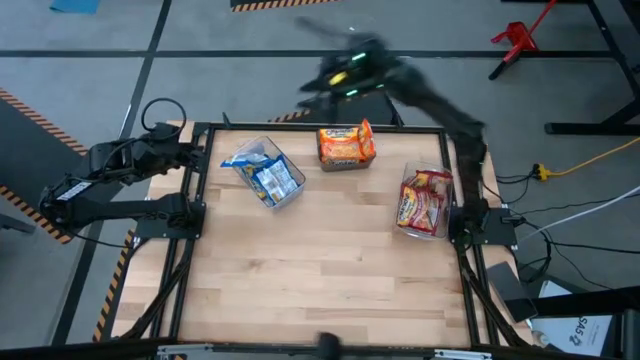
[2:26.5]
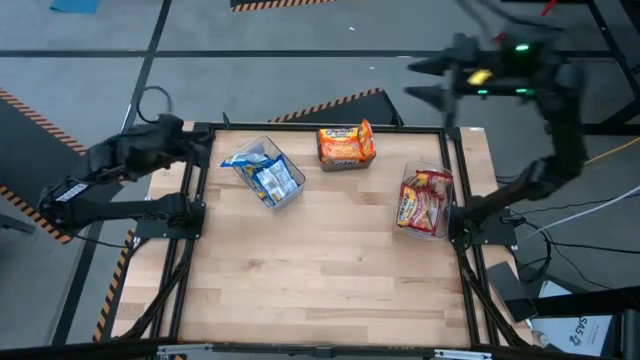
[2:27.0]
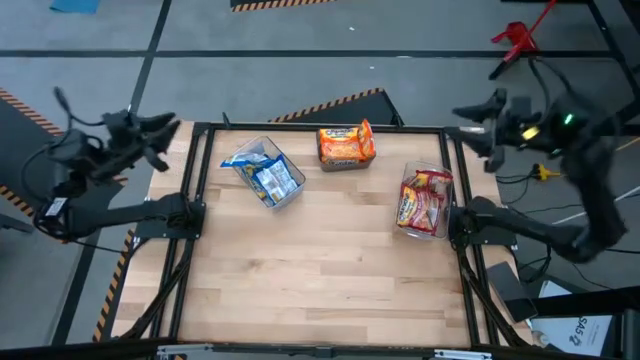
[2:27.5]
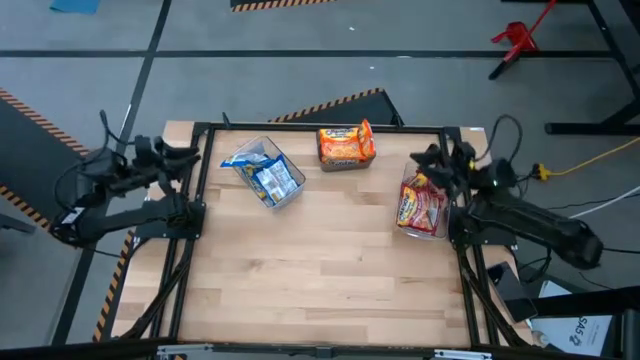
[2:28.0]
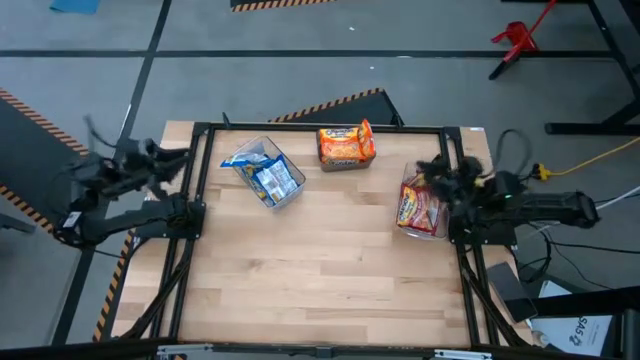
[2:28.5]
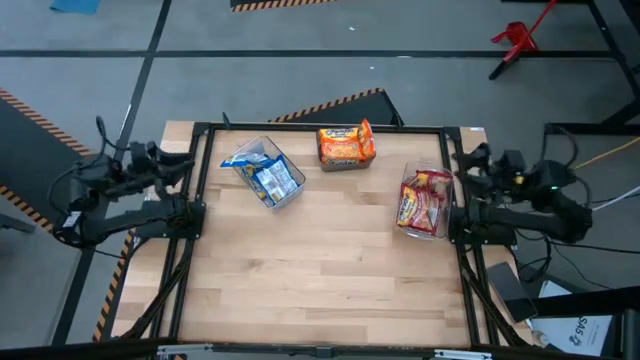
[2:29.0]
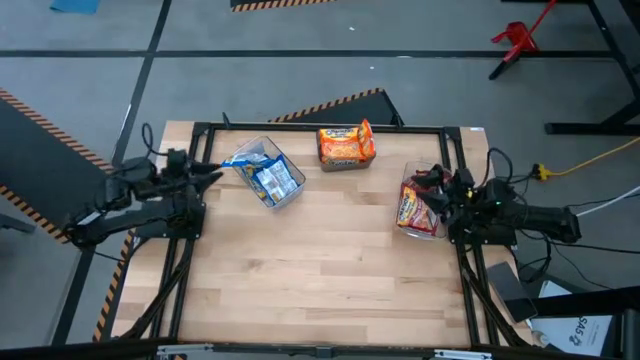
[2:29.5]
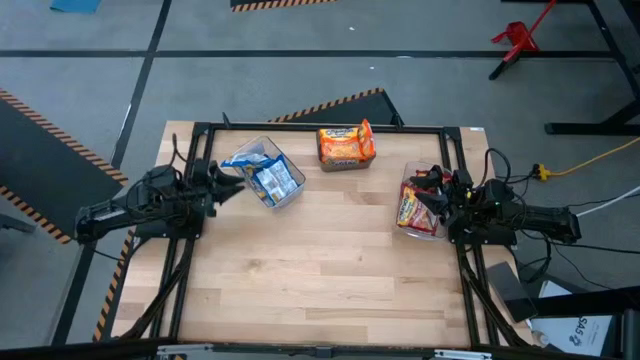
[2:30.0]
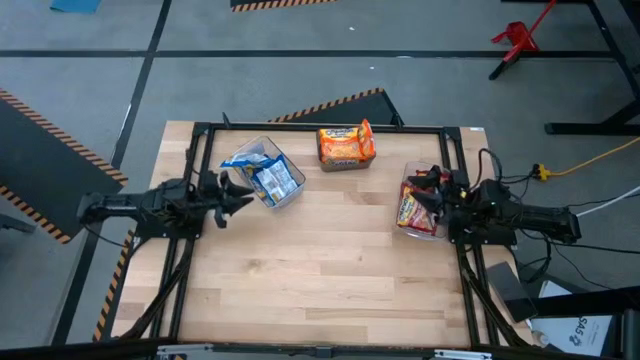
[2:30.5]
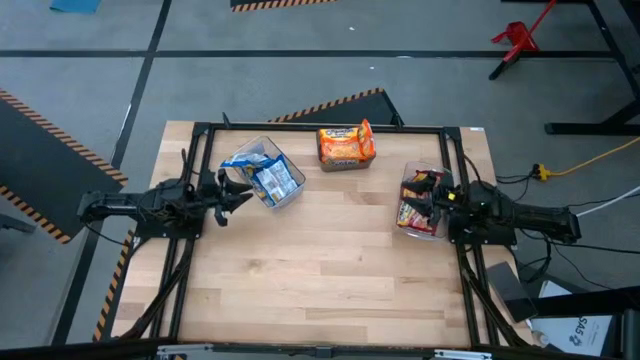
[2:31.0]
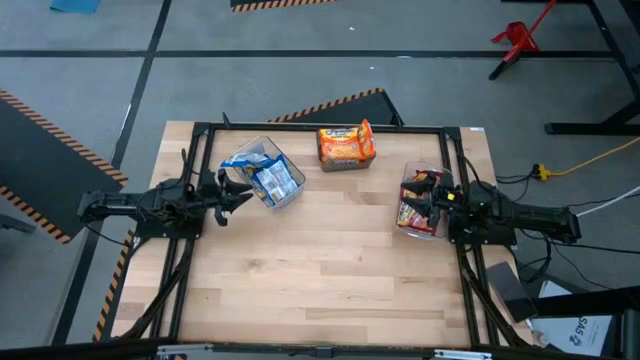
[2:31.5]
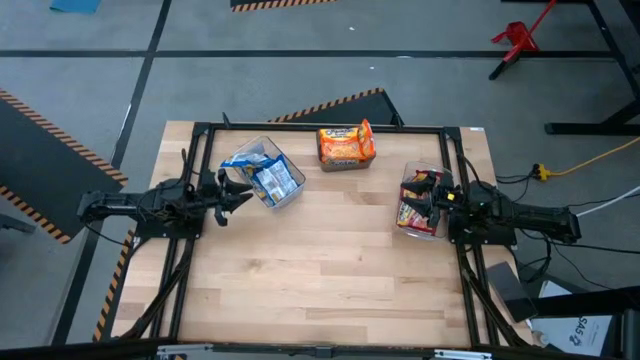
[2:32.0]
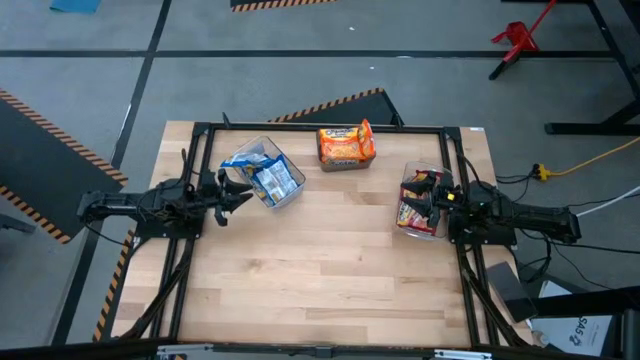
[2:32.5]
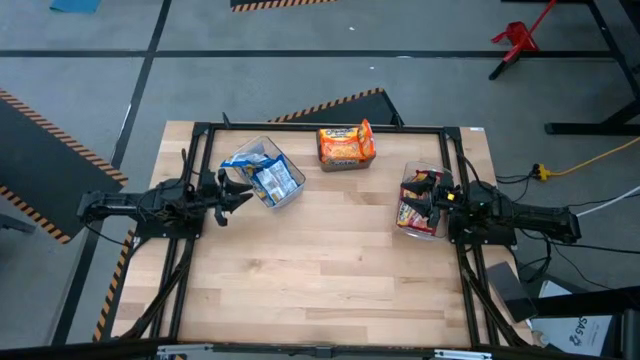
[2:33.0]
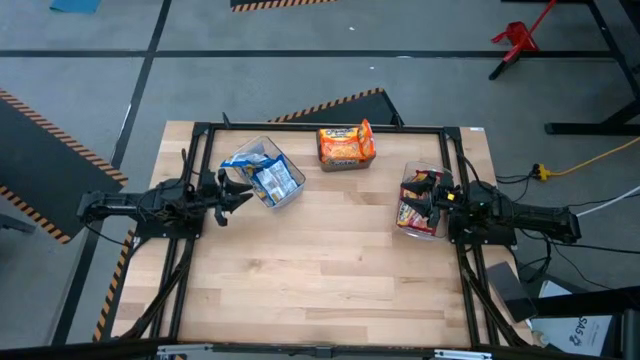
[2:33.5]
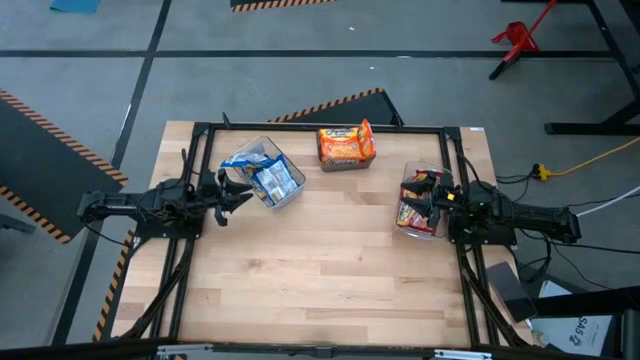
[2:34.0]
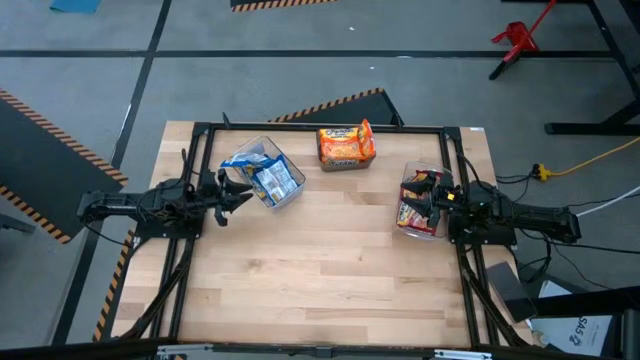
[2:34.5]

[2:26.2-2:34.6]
Task: Sort Maruchan noodles
Return to Home Position

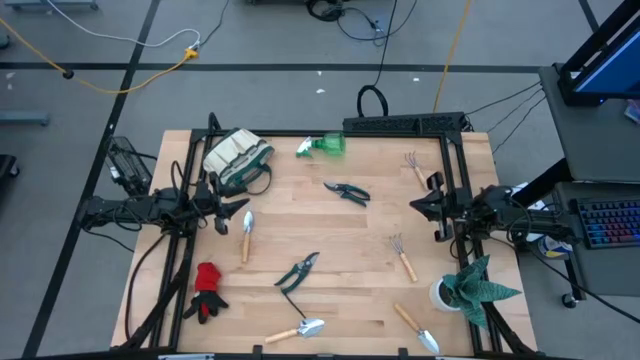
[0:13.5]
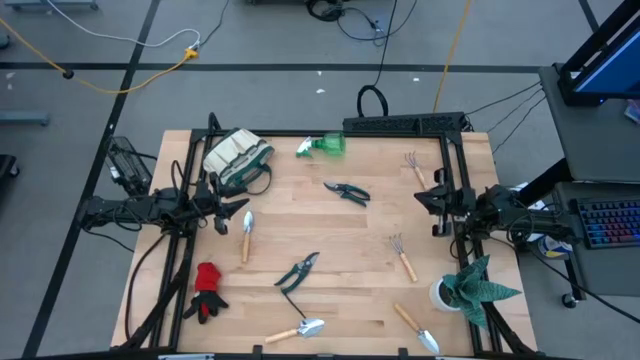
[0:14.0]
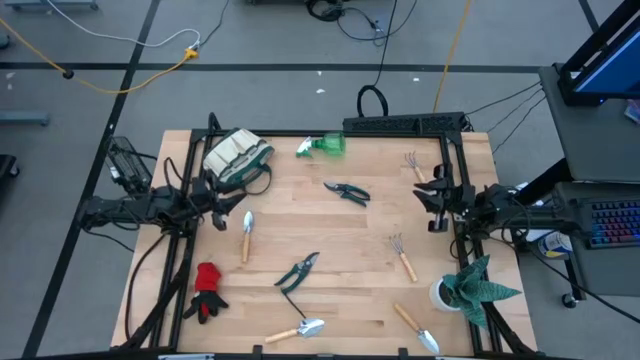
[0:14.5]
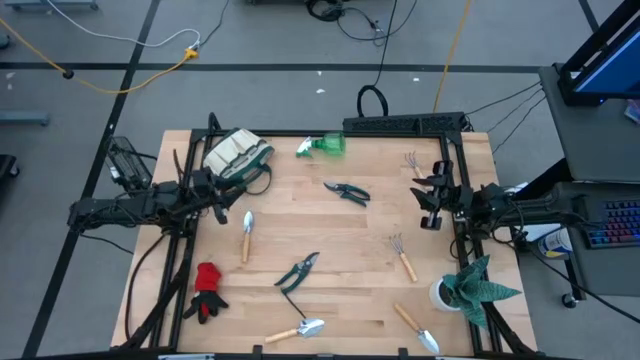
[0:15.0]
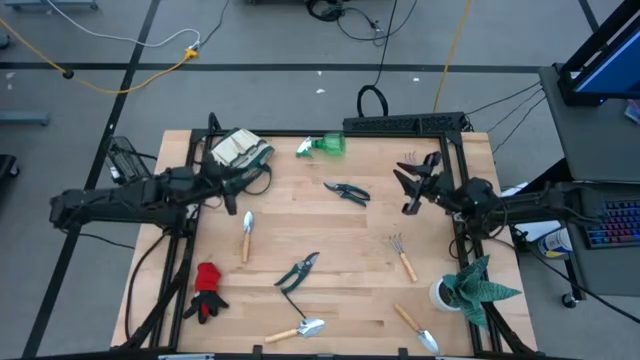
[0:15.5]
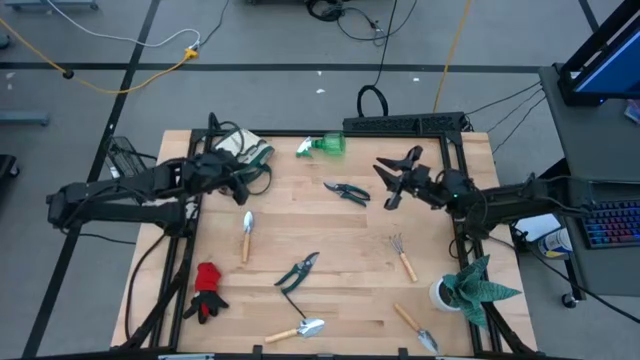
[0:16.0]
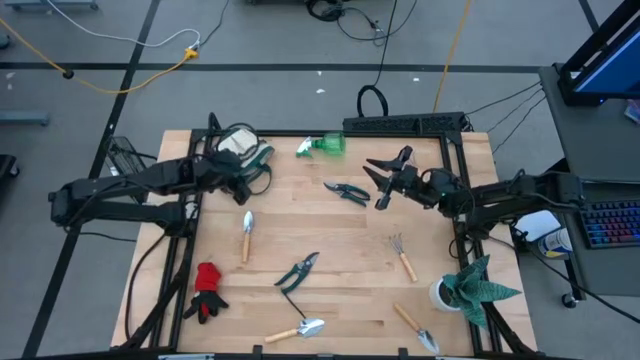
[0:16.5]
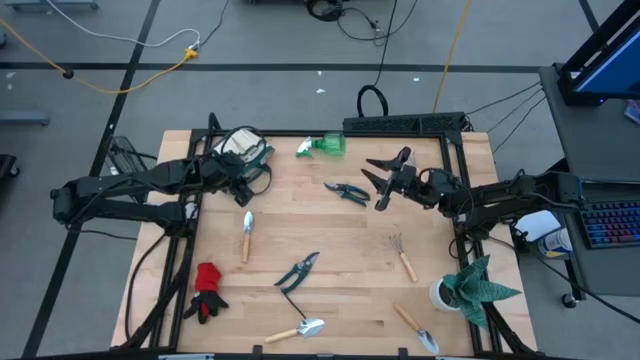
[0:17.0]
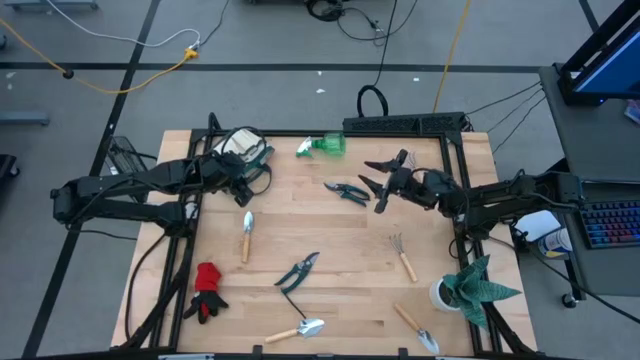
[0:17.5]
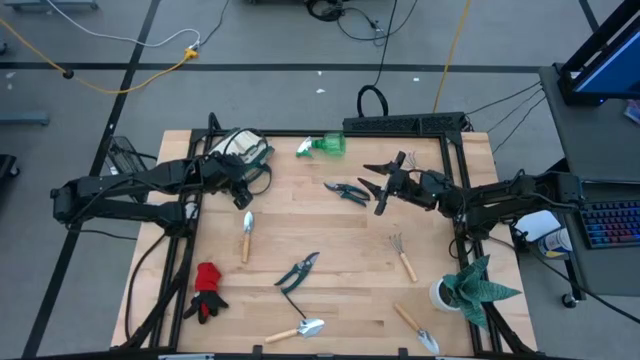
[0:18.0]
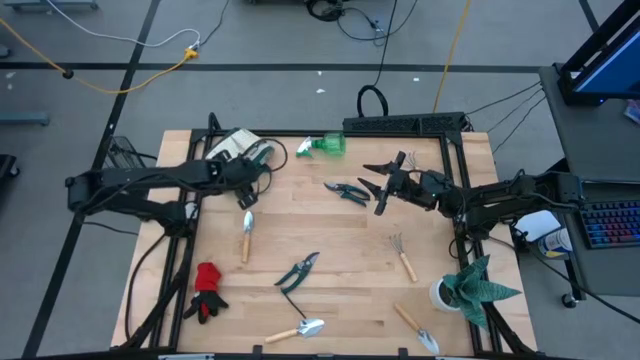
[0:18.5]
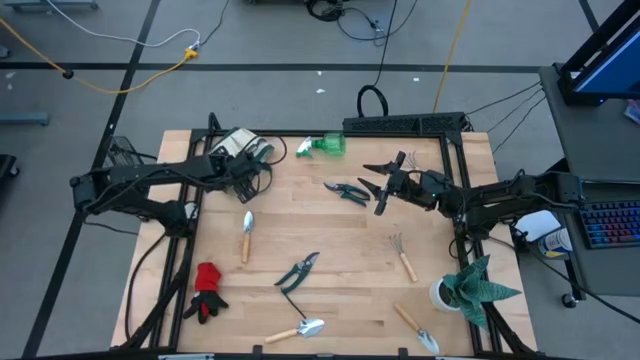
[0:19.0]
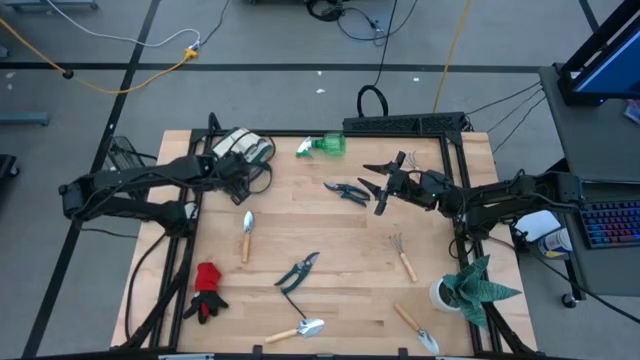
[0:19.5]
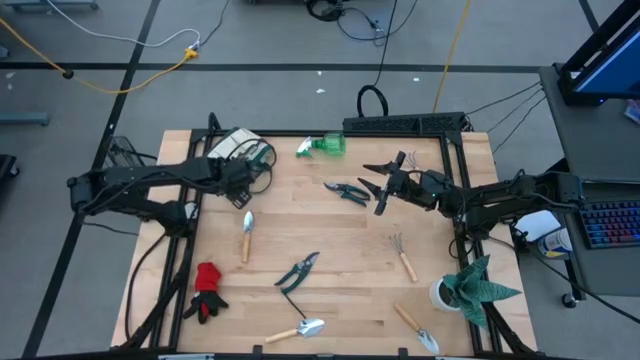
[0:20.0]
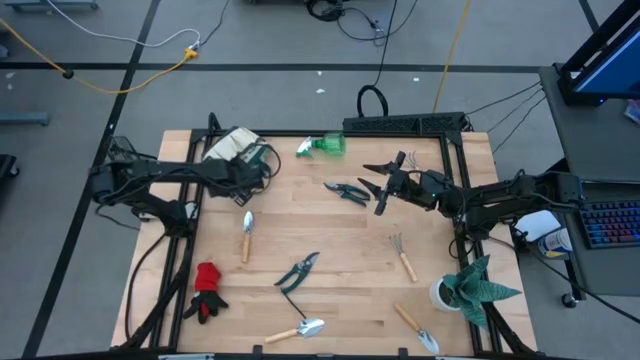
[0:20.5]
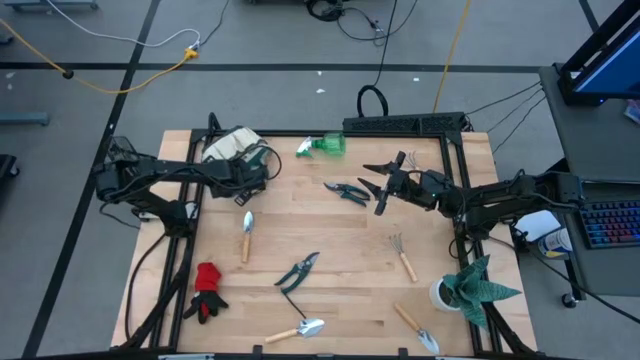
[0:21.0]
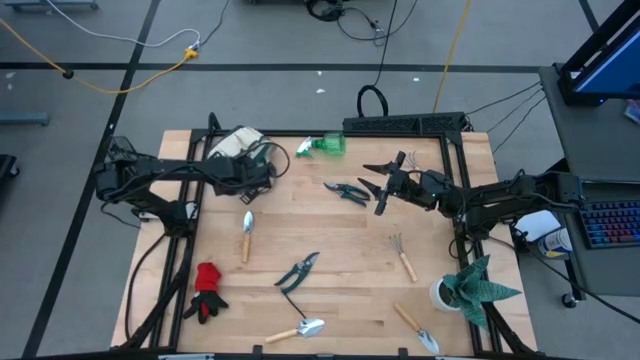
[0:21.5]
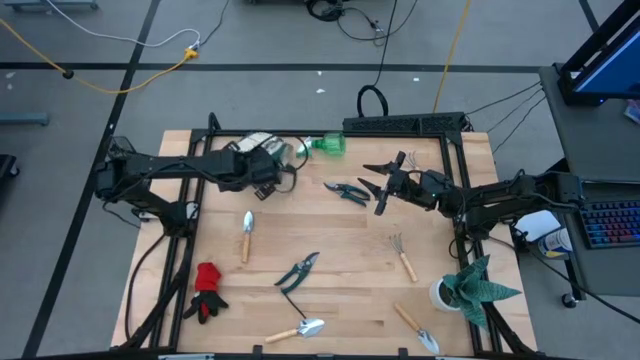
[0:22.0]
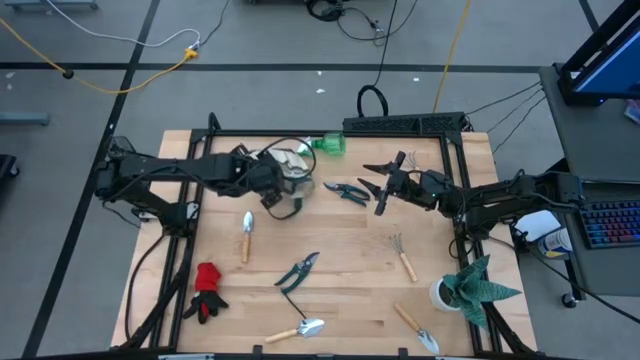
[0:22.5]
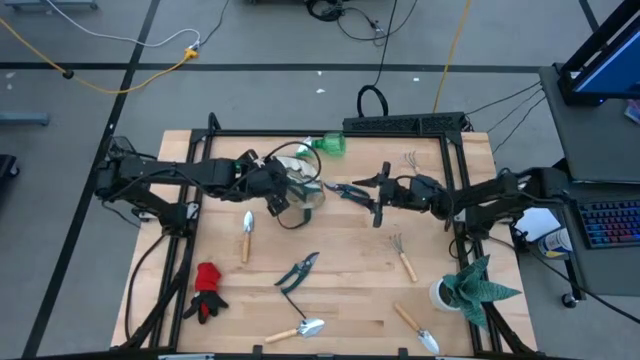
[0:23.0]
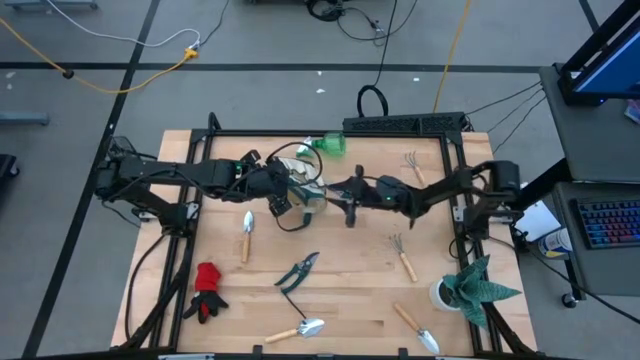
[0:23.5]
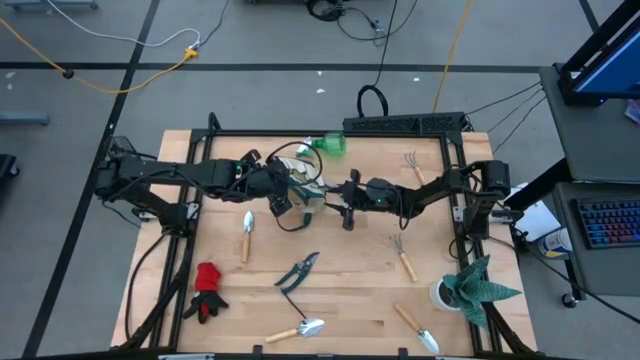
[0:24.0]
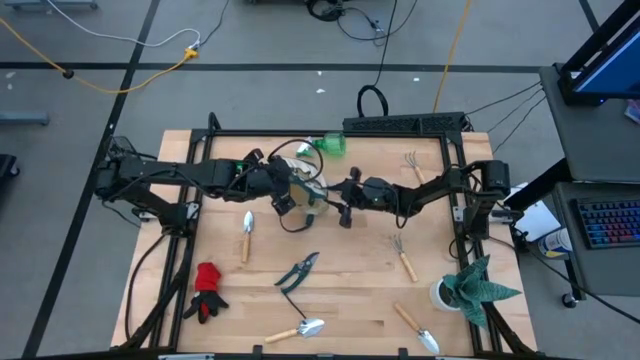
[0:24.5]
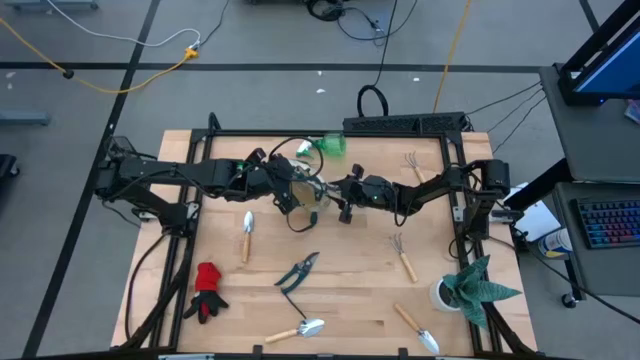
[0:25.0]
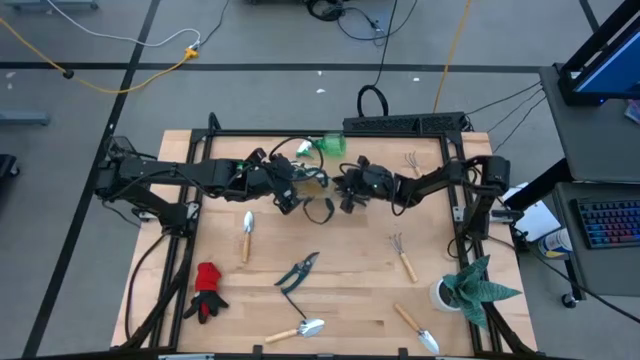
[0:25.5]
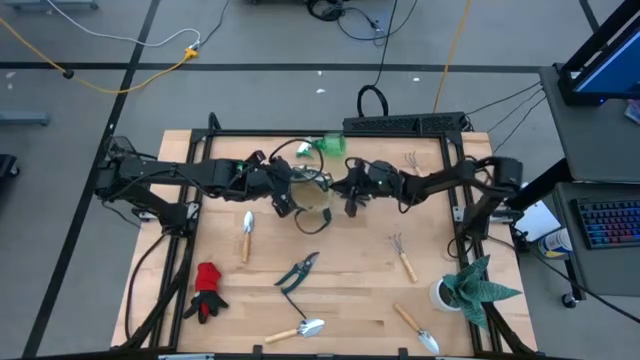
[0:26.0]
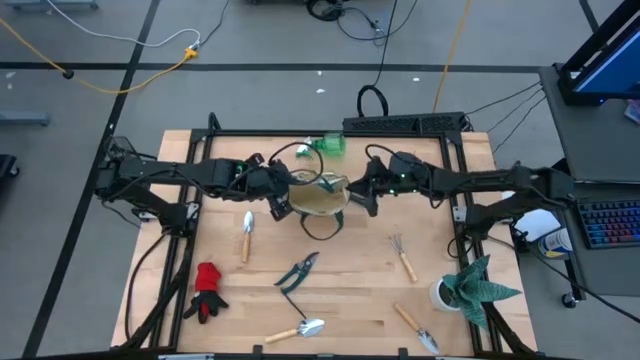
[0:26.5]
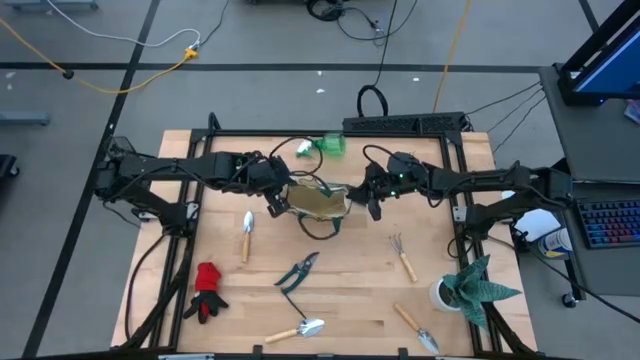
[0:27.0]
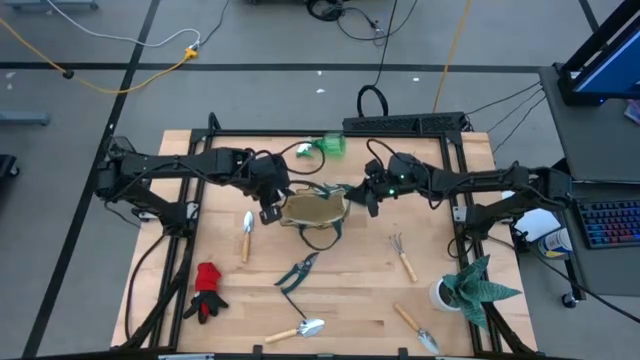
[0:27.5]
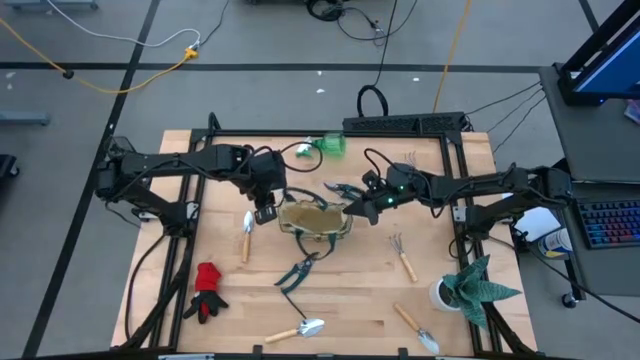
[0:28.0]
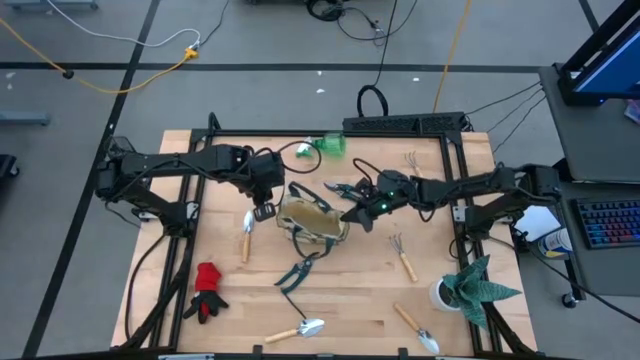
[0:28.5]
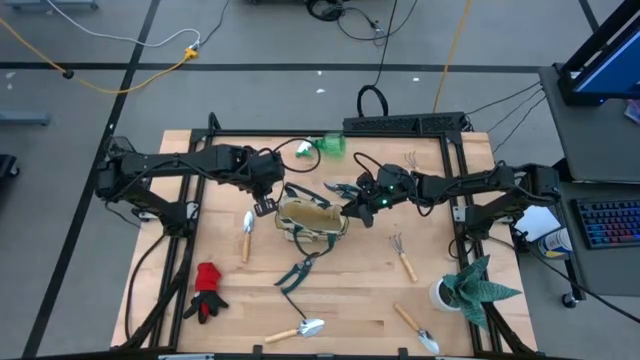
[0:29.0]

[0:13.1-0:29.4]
Task: Pick & Place Garden tools in Gardening bag
Move the brown gardening bag to the center of the table
